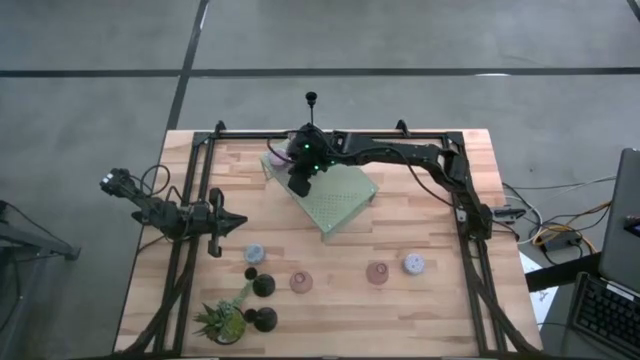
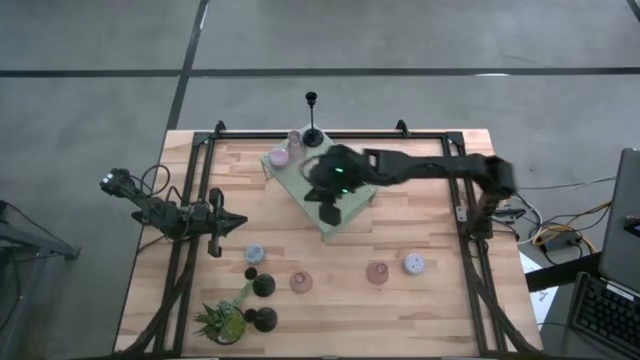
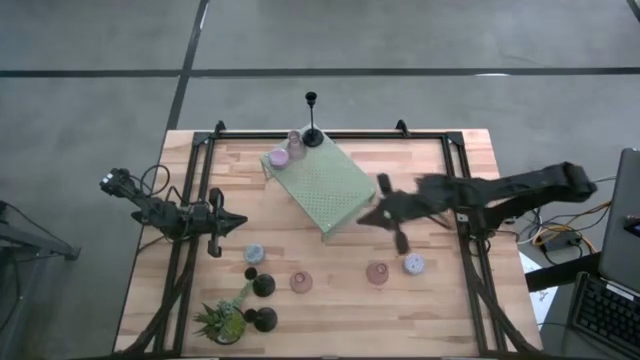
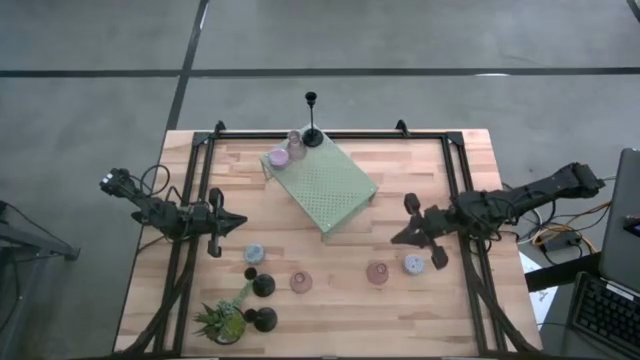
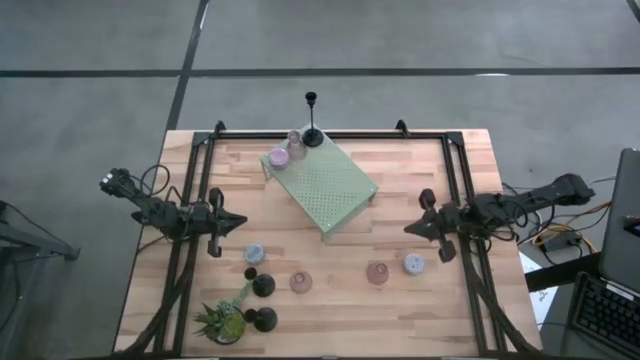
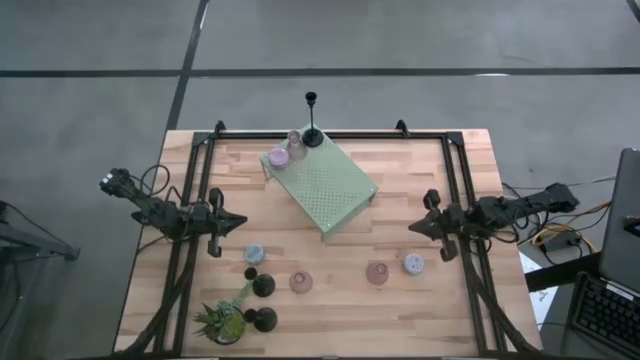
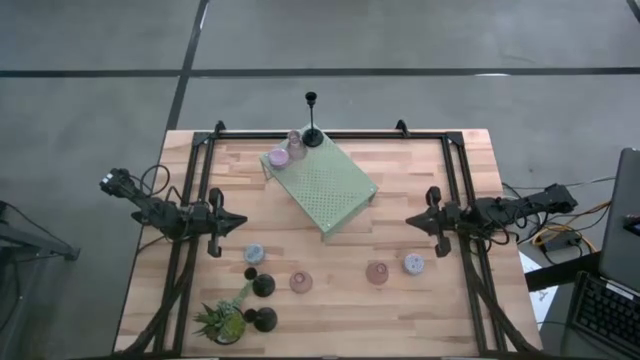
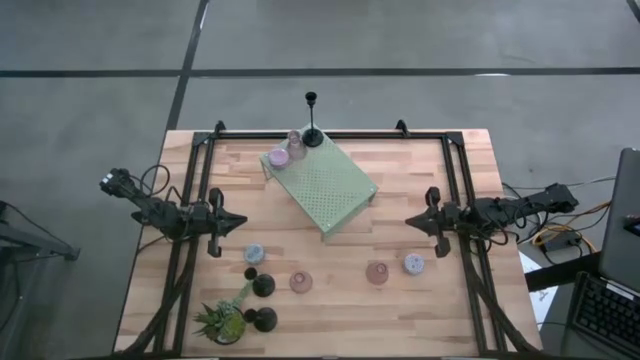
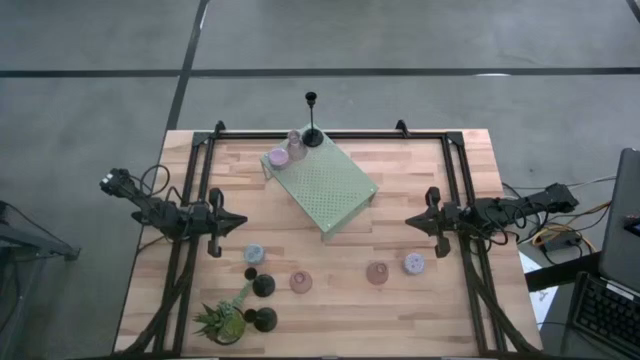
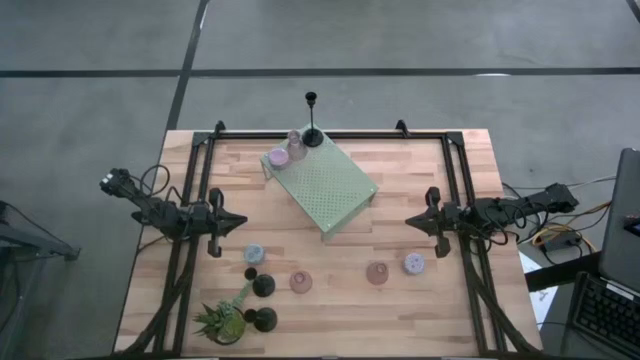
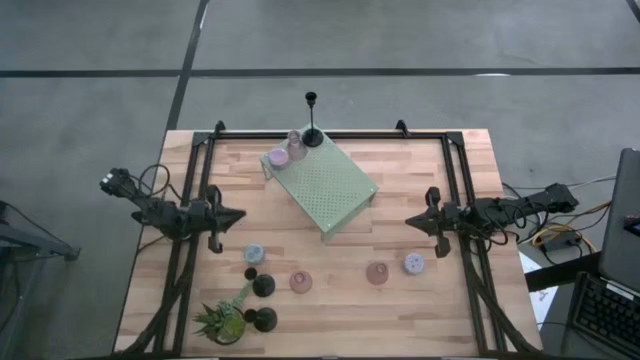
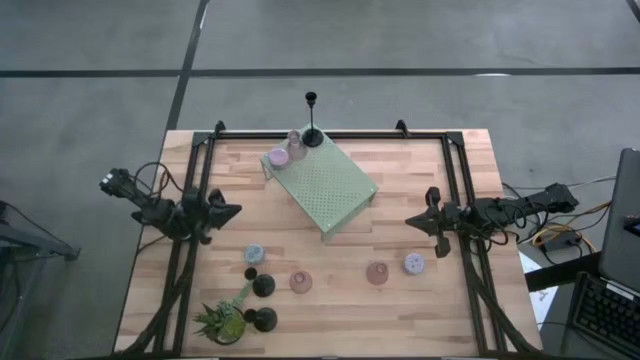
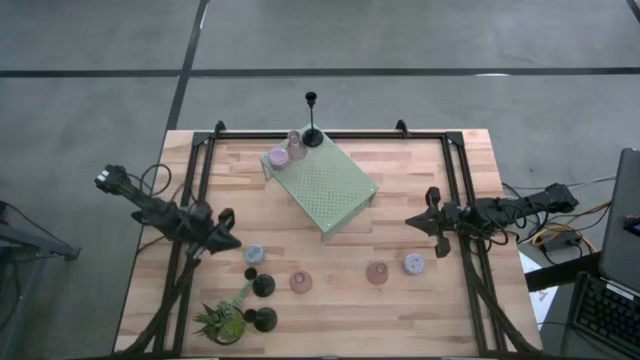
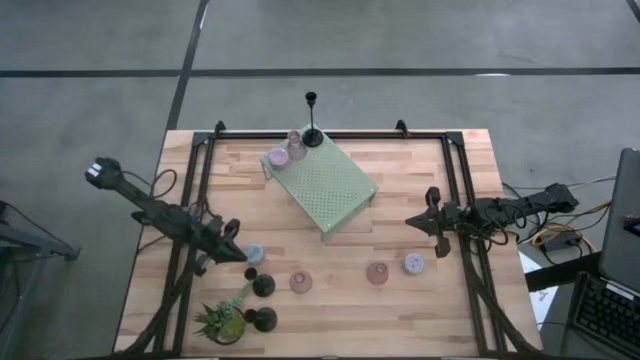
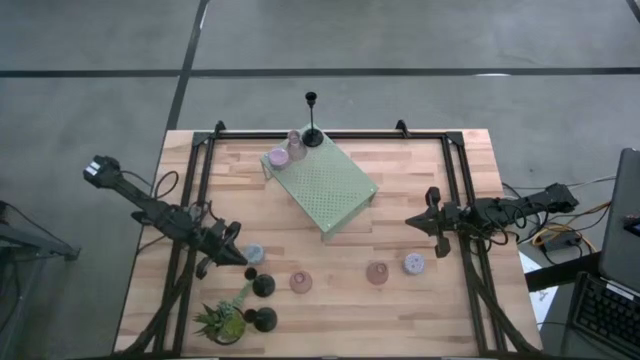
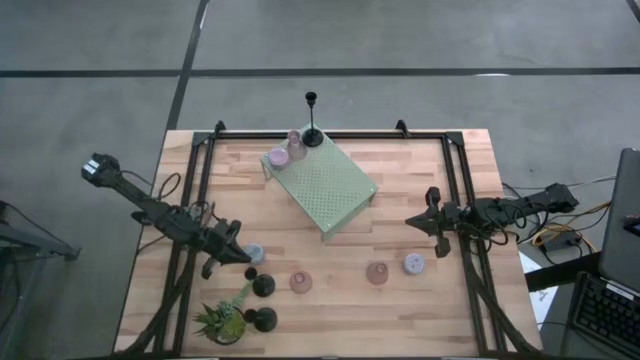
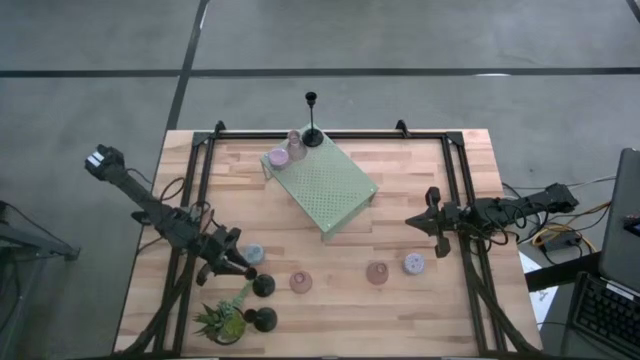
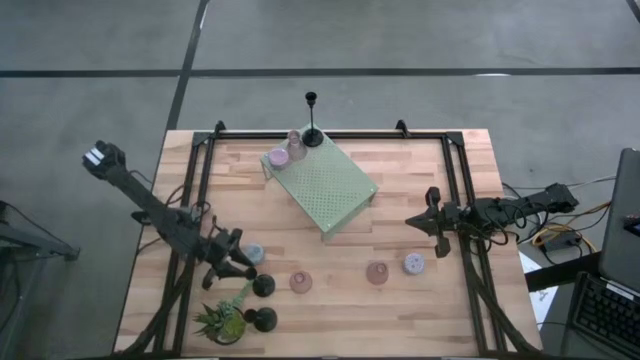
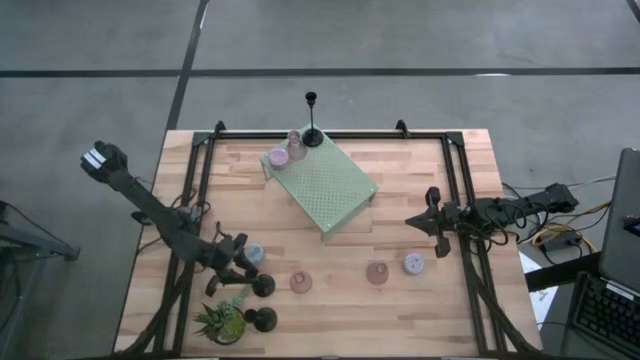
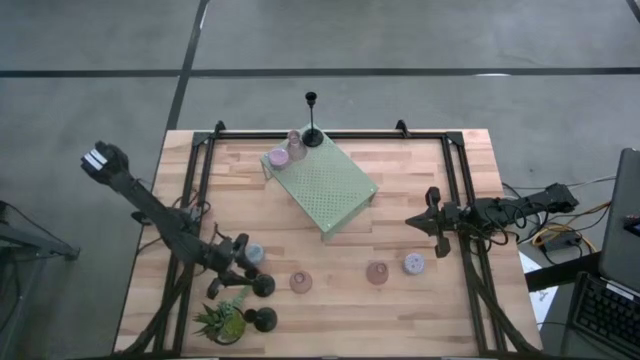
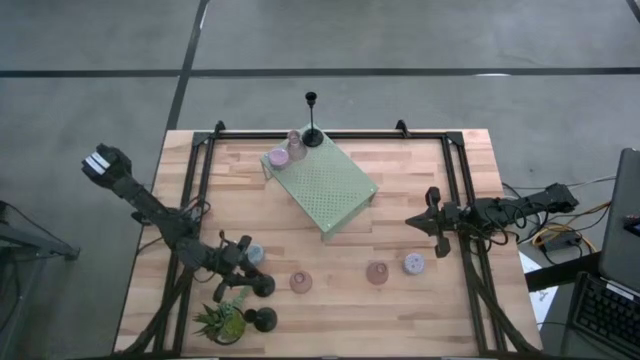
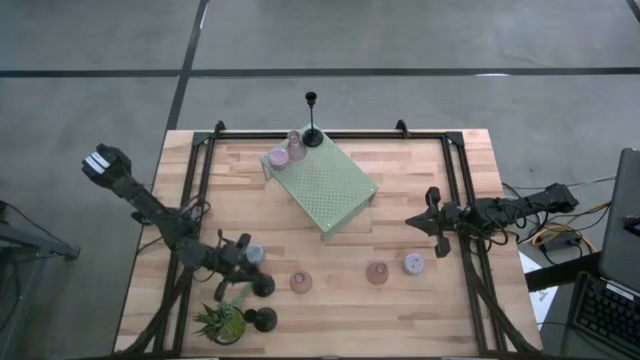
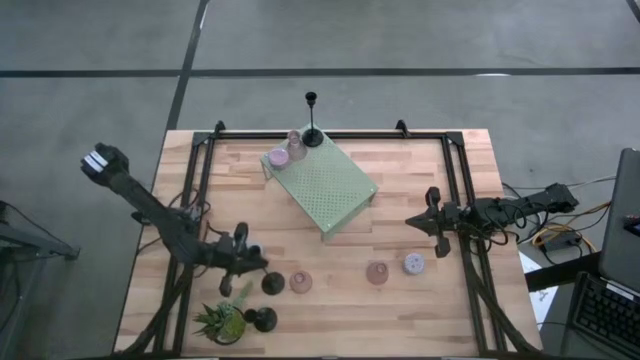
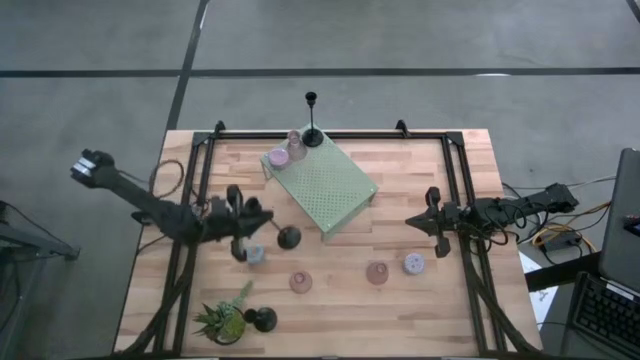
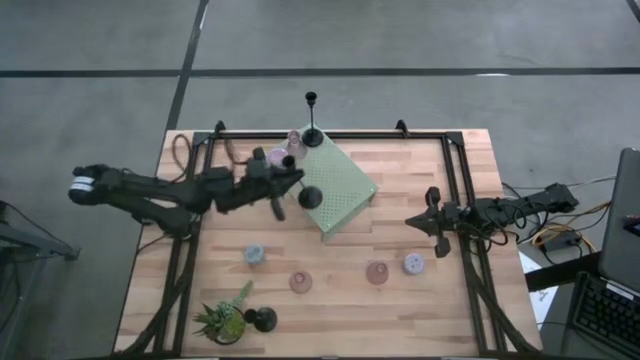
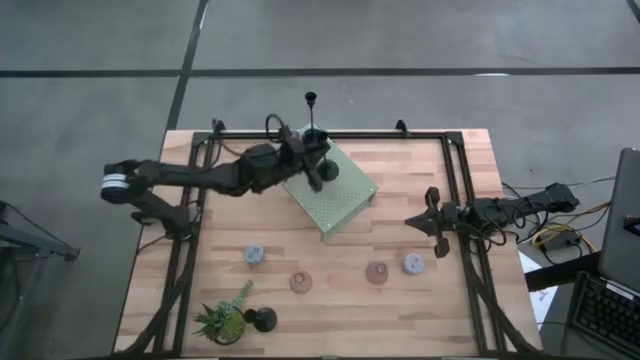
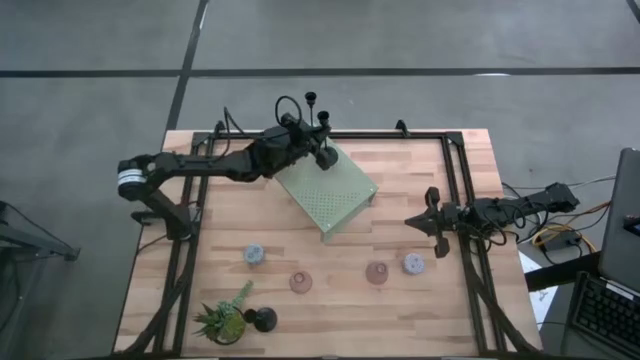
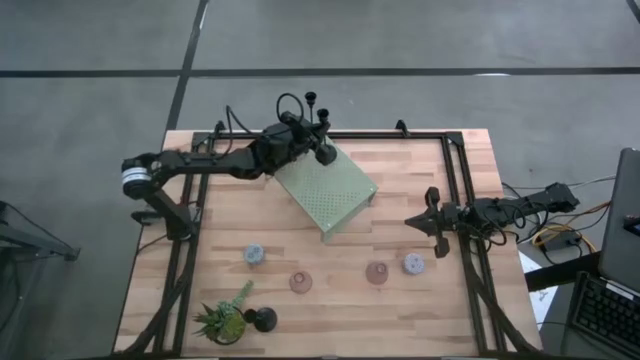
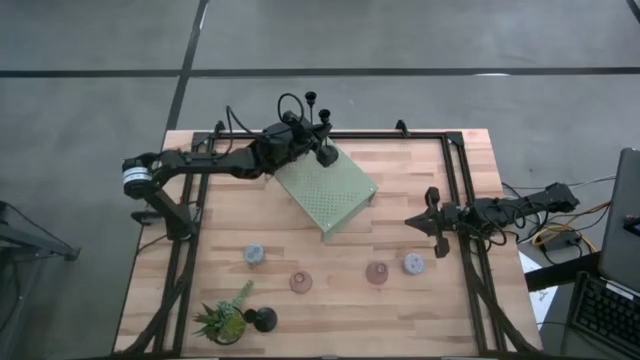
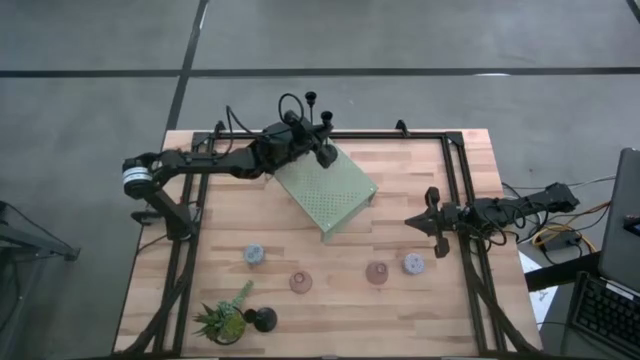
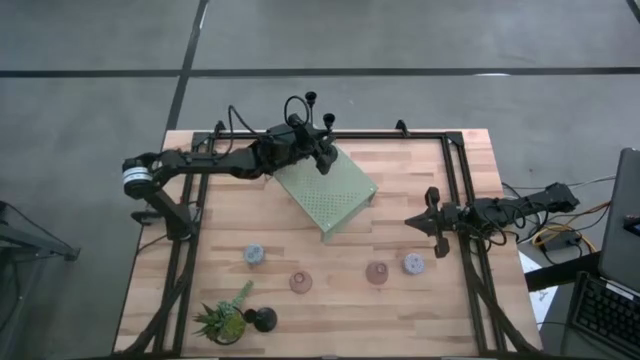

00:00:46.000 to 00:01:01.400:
Task: Pick & Place candle stick holders
Put the top black candle holder on the shelf

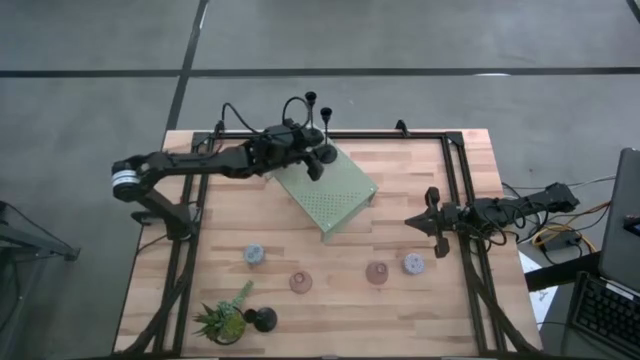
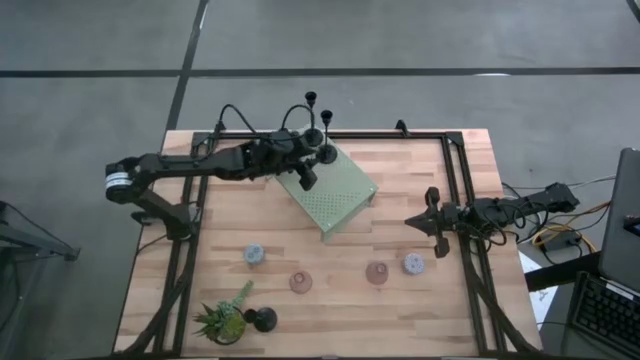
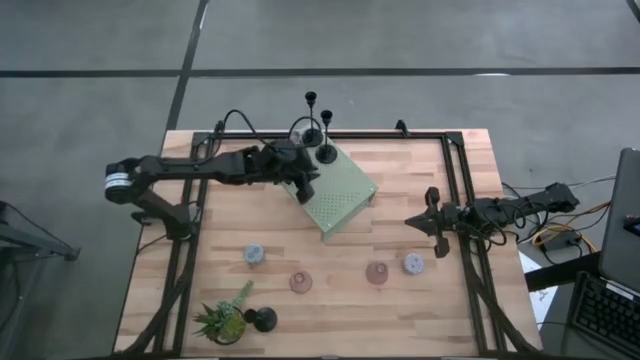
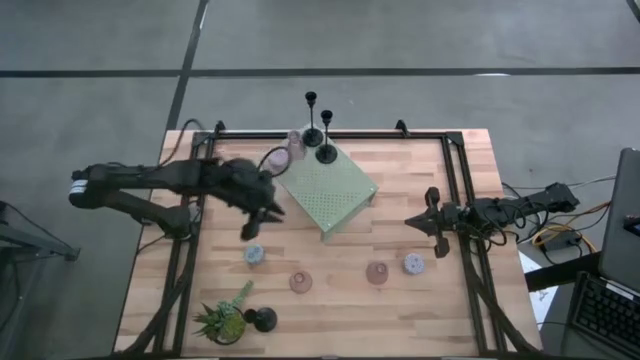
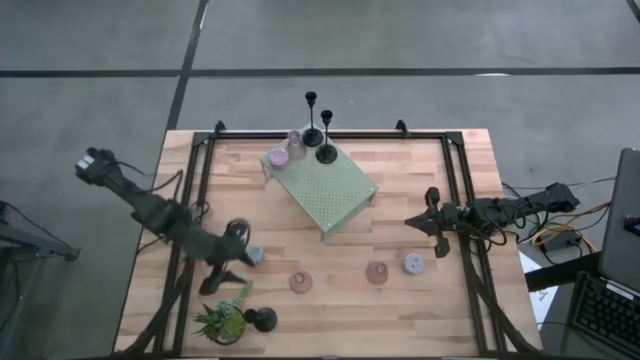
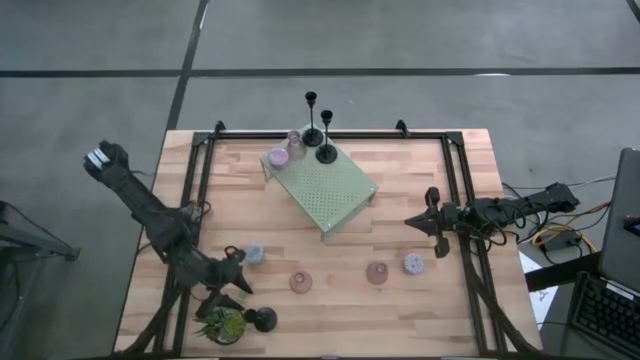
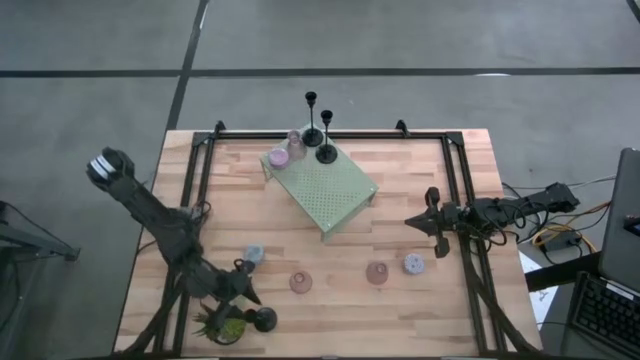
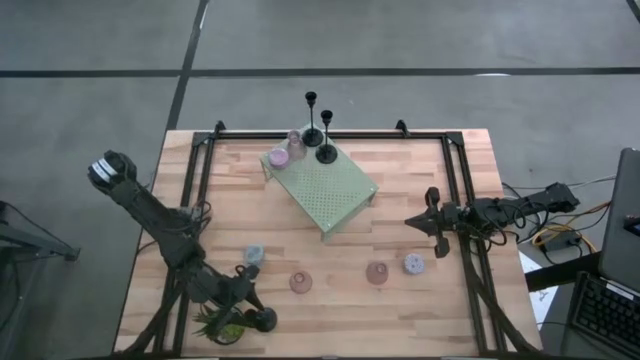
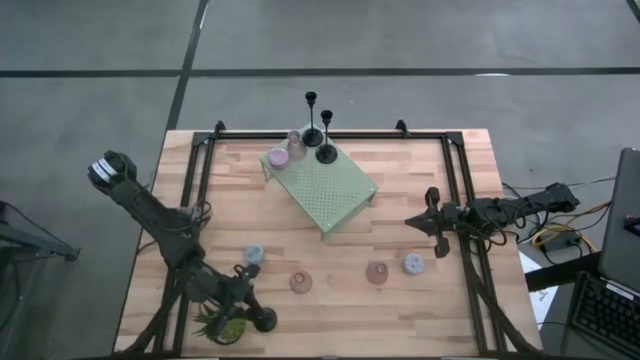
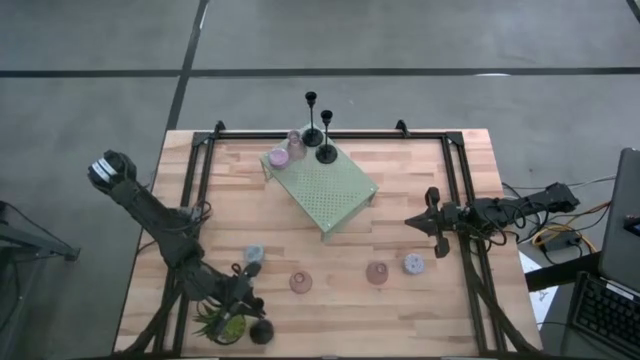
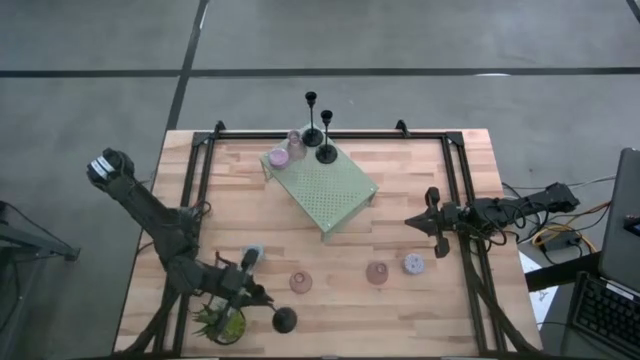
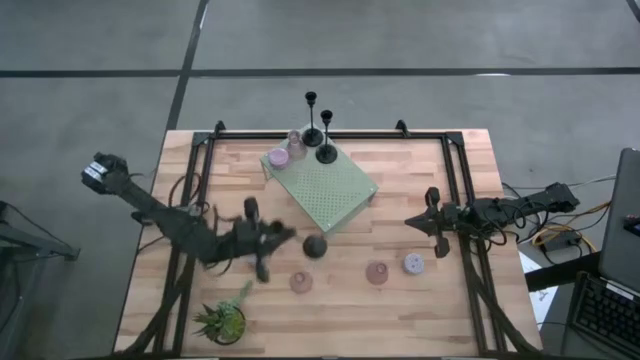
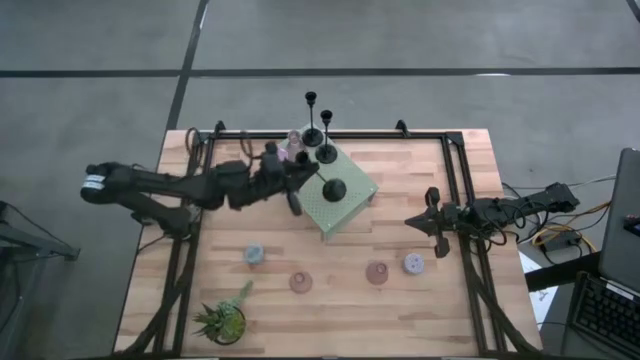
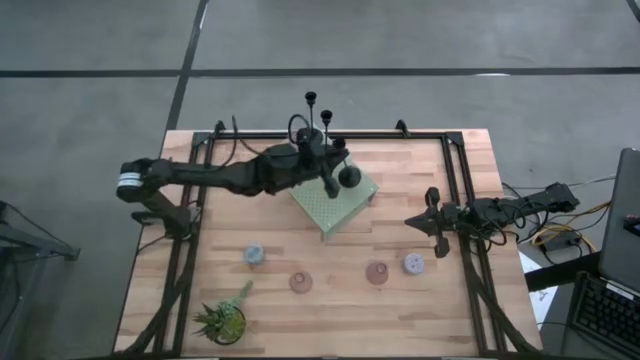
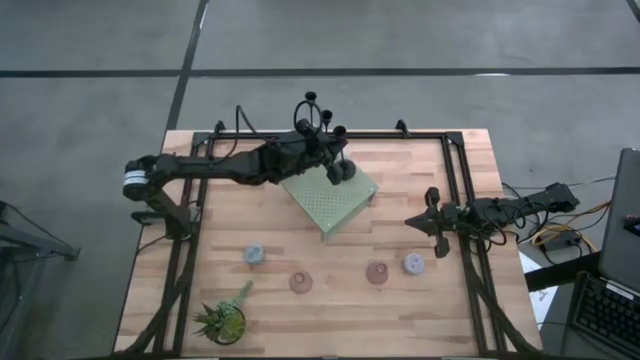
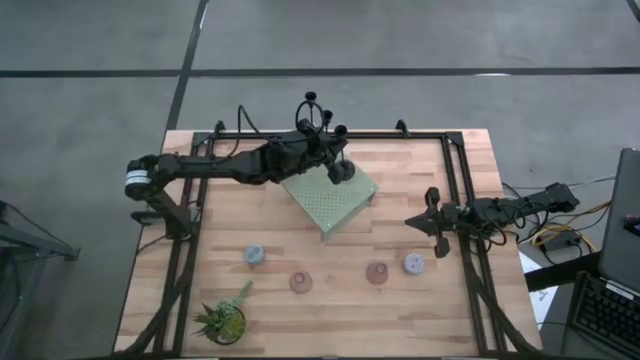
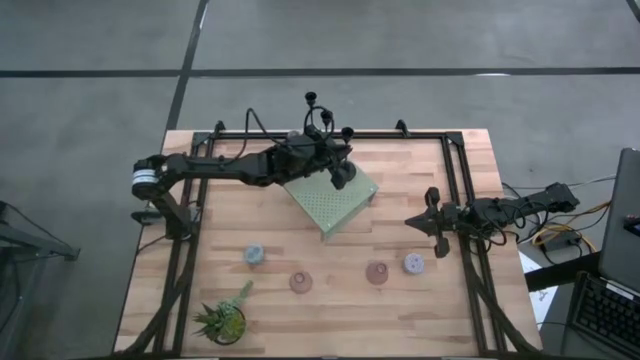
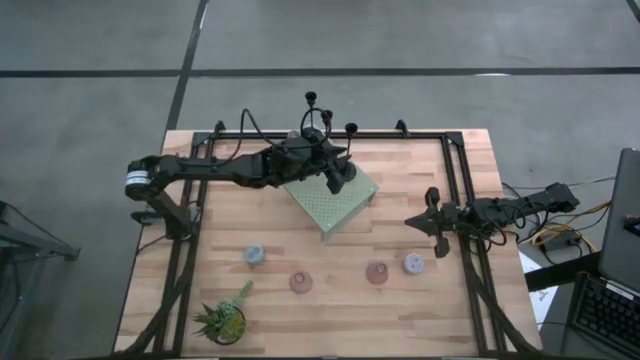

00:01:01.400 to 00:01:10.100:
Put the black candle holder on the shelf
